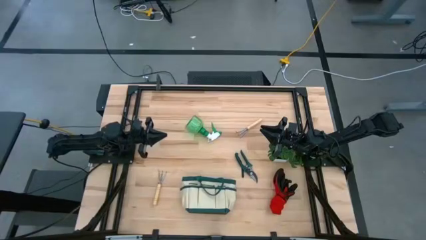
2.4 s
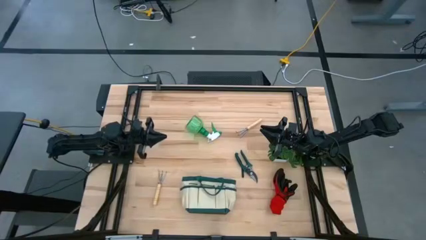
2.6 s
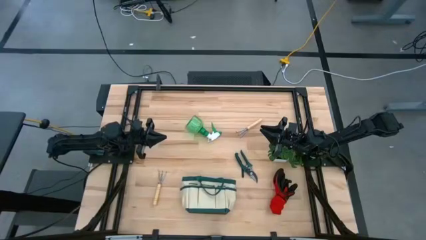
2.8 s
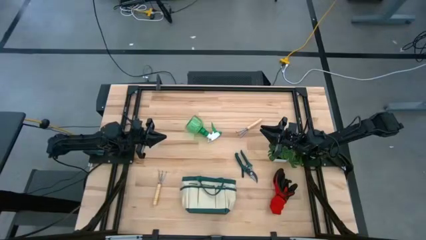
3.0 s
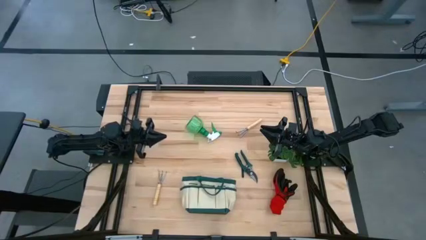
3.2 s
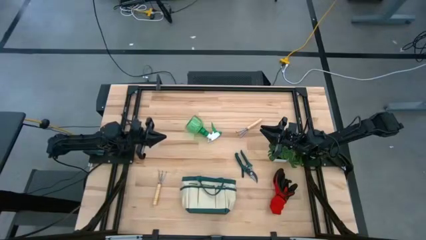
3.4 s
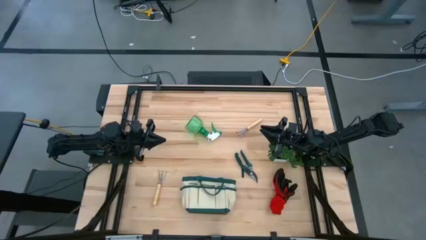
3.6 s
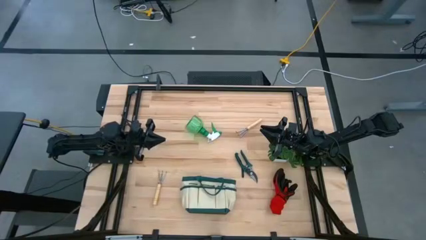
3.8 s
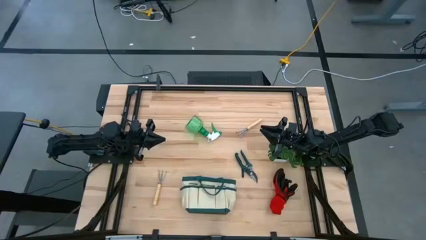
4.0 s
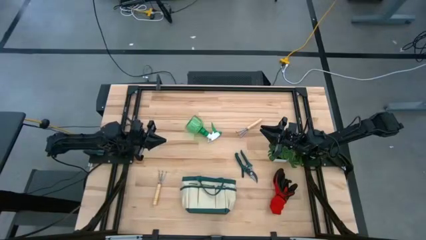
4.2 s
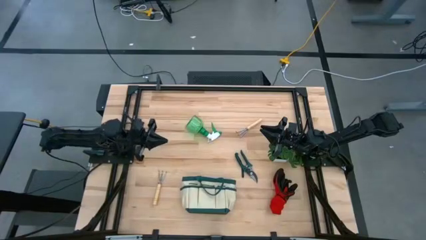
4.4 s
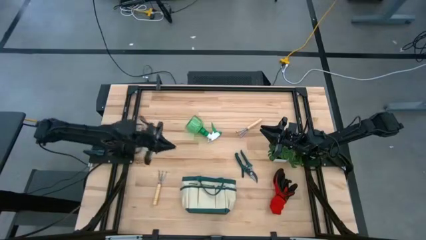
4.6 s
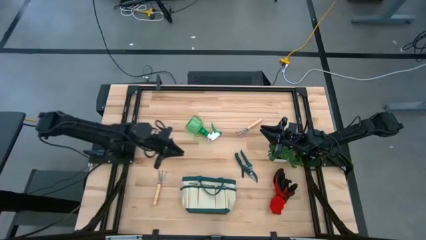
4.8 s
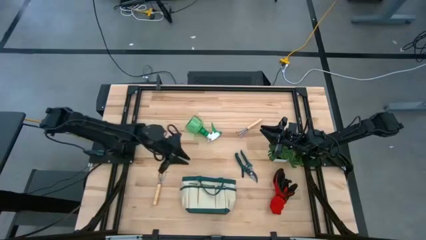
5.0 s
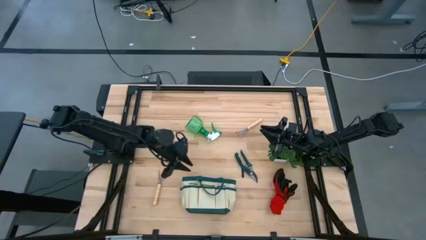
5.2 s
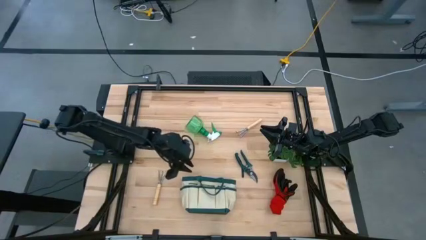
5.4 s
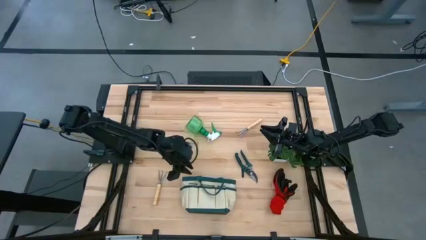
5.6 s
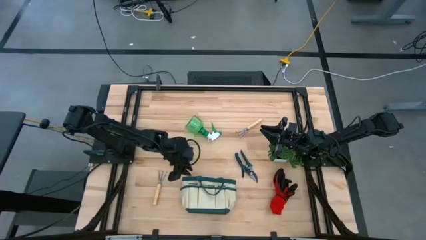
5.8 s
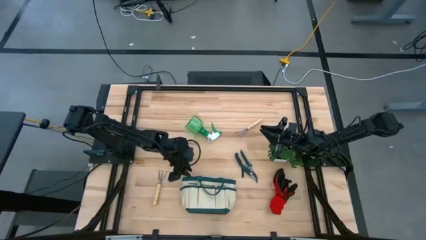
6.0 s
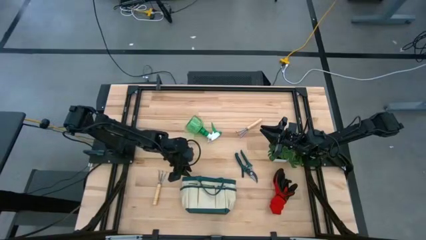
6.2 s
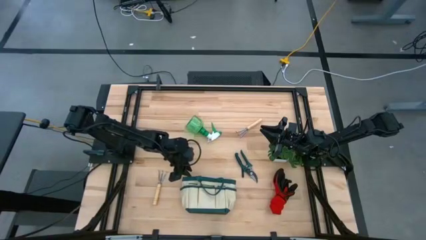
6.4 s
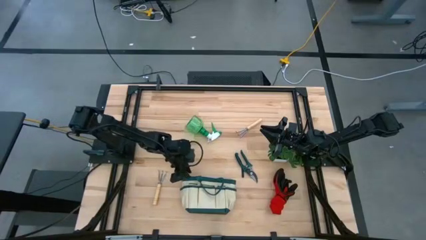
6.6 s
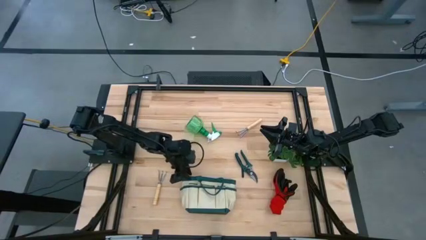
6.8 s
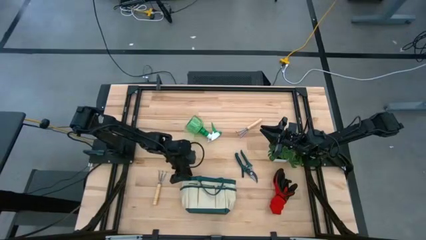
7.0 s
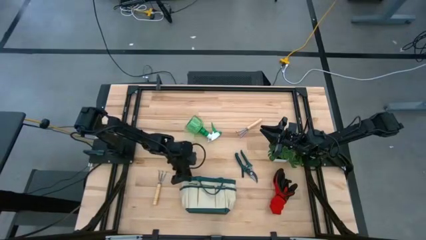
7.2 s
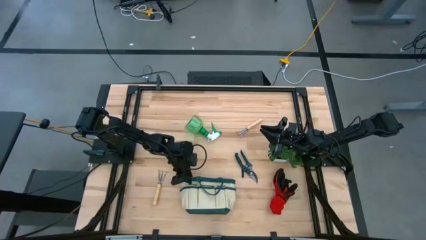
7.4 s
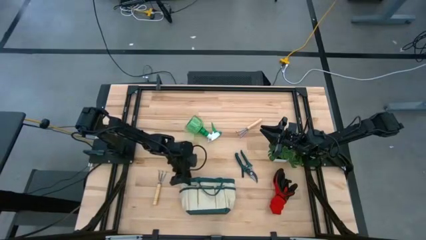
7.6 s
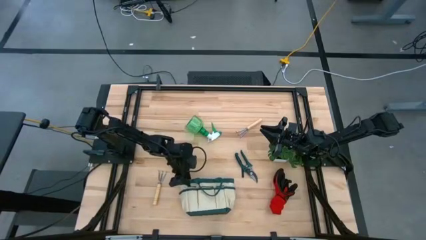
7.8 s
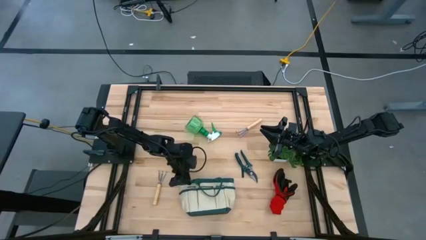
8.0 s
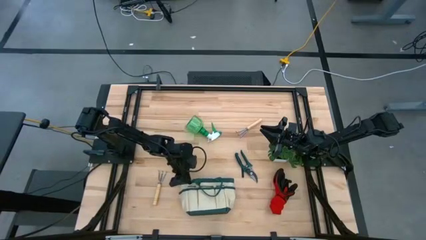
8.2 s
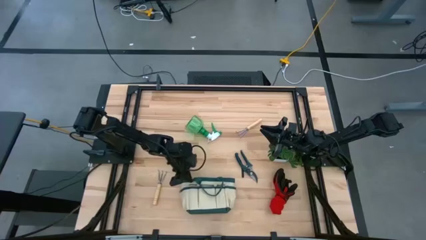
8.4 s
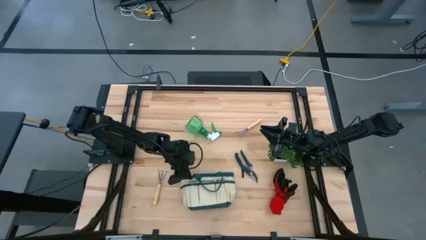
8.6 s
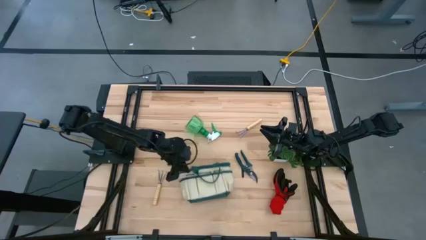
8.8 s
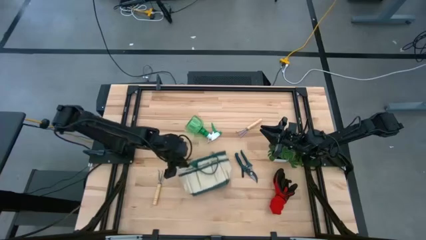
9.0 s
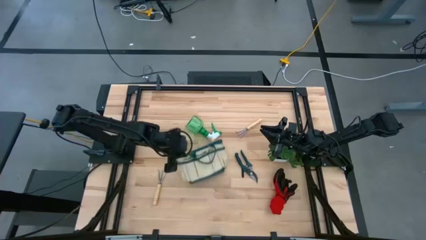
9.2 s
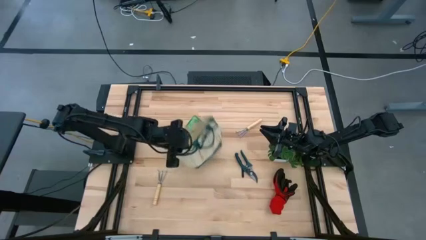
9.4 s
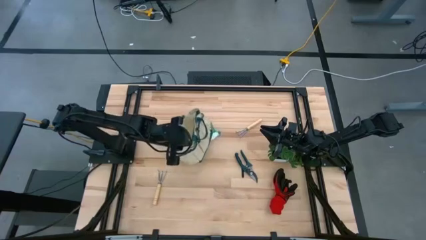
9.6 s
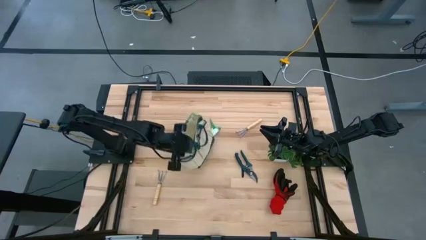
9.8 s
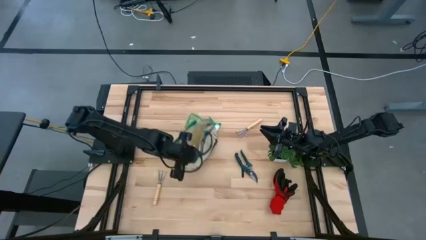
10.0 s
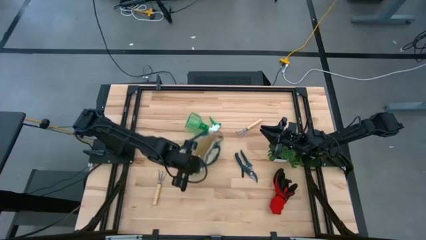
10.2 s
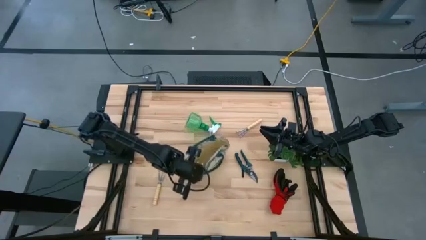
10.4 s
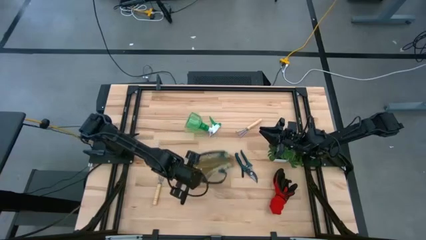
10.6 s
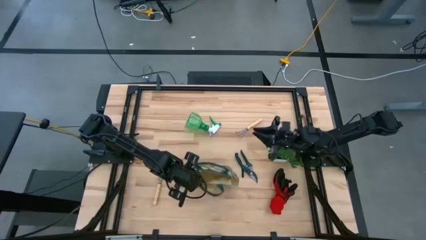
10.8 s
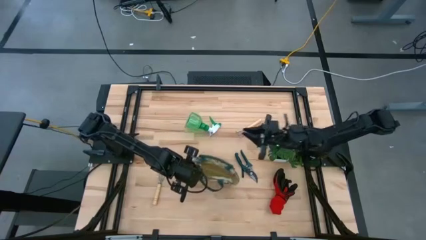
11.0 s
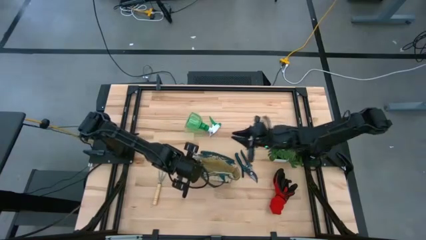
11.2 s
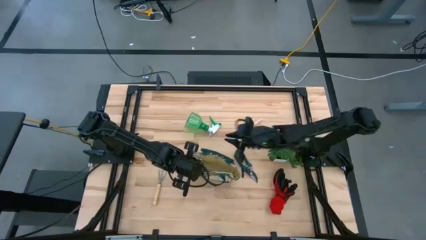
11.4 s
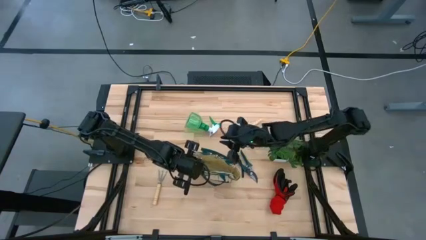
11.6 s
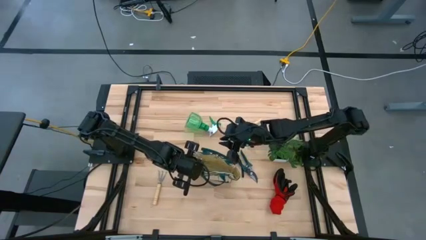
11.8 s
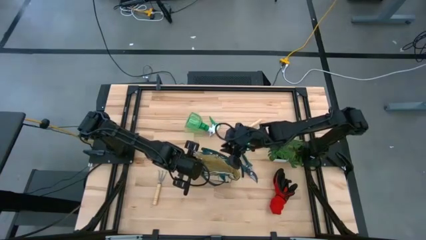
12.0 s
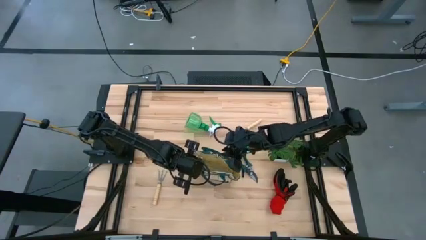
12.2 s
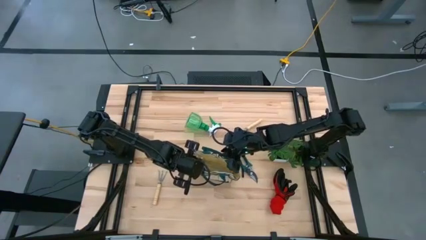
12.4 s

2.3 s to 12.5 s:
Task: Pick & Place Garden tools in Gardening bag
Prepare the gardening bag

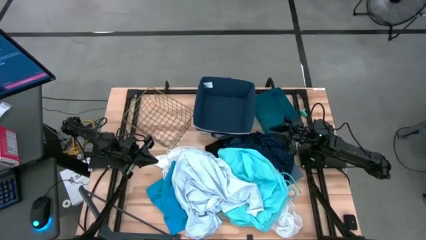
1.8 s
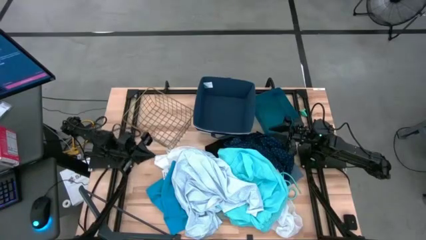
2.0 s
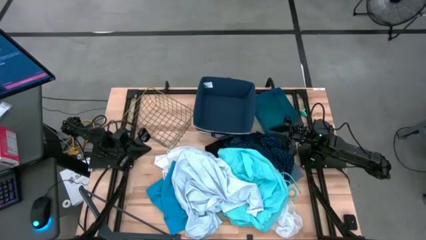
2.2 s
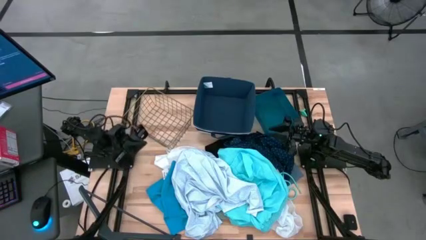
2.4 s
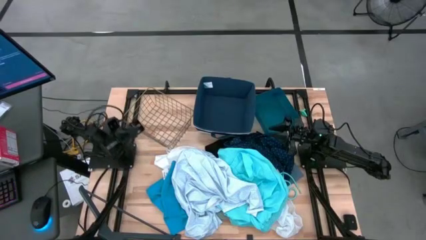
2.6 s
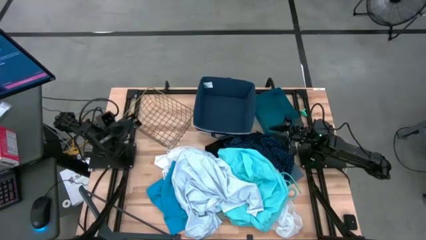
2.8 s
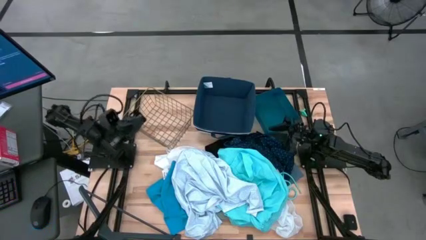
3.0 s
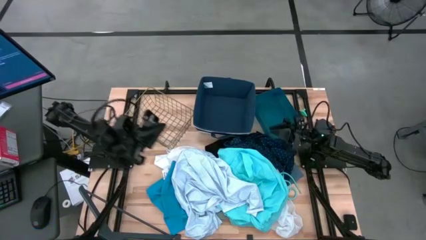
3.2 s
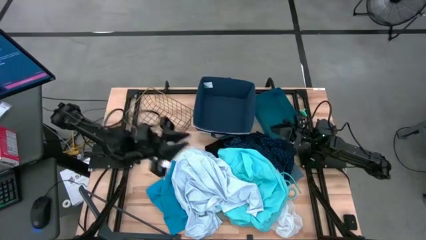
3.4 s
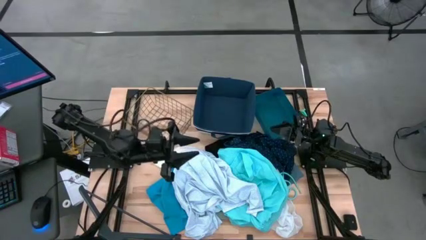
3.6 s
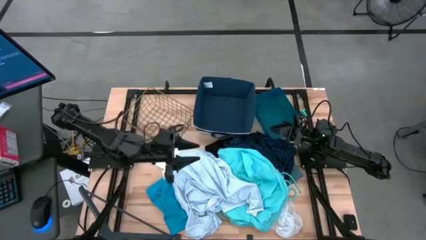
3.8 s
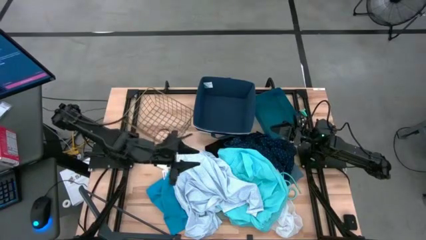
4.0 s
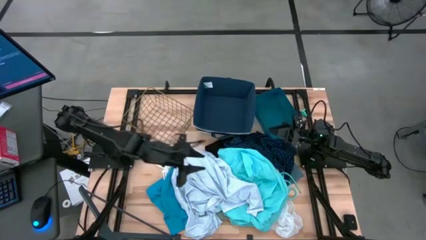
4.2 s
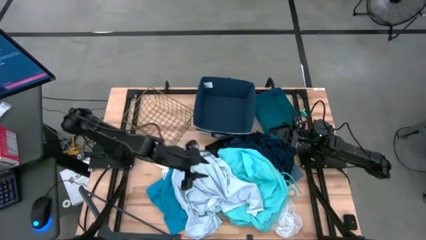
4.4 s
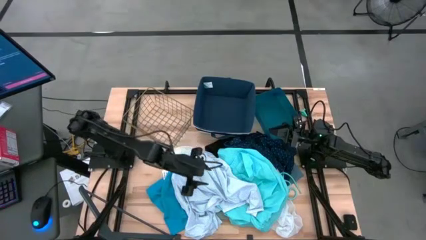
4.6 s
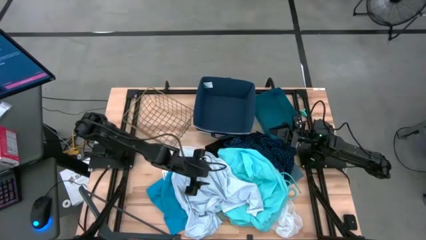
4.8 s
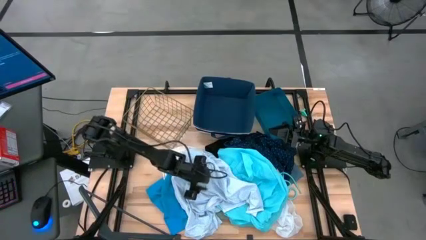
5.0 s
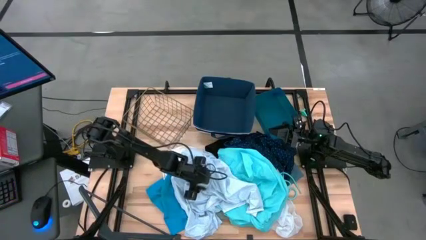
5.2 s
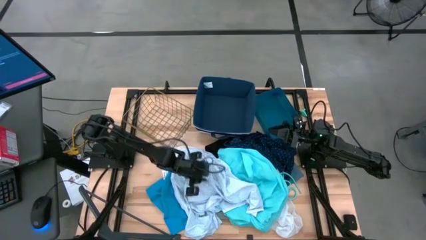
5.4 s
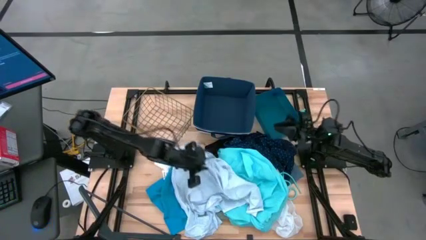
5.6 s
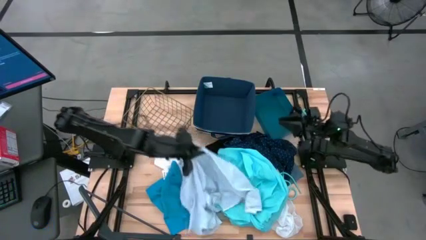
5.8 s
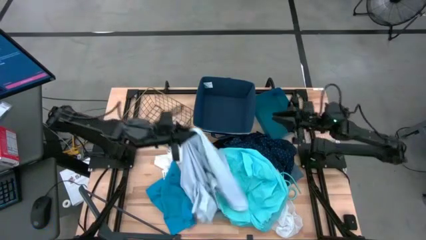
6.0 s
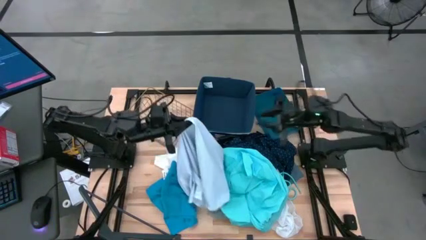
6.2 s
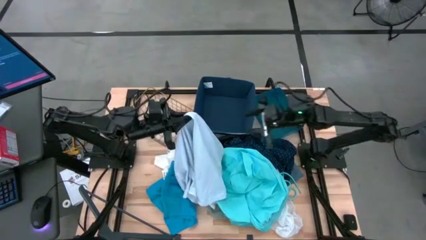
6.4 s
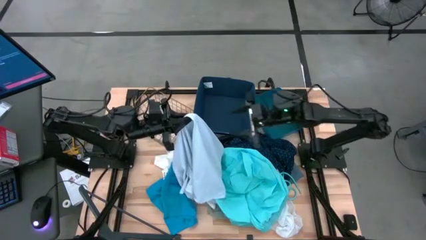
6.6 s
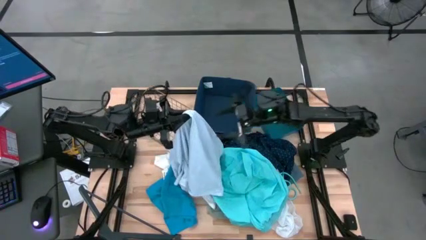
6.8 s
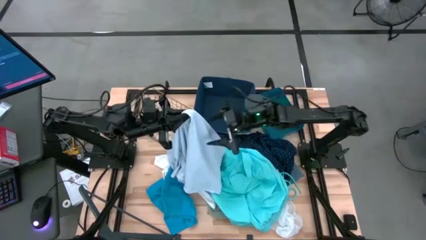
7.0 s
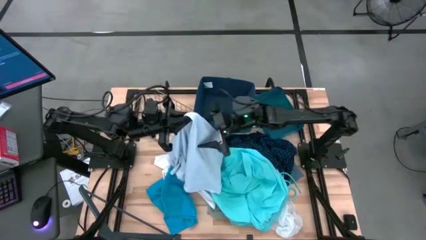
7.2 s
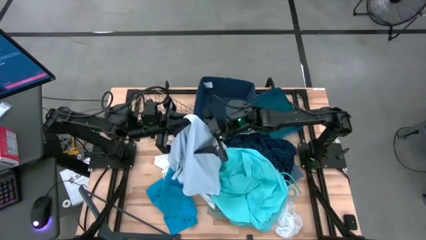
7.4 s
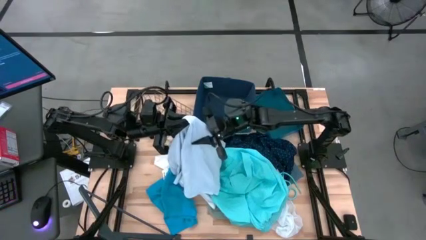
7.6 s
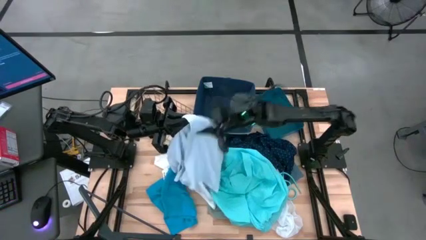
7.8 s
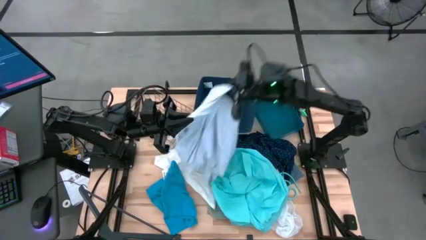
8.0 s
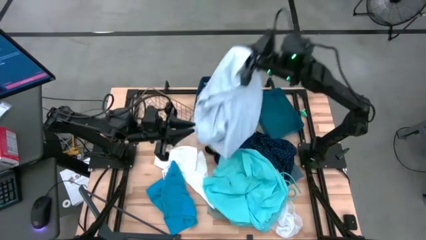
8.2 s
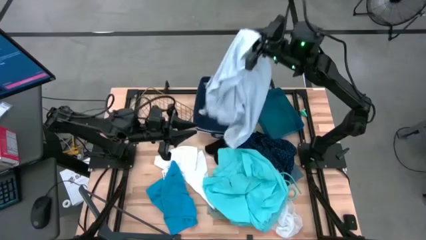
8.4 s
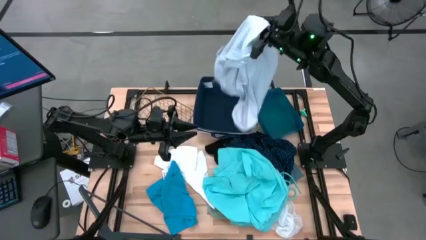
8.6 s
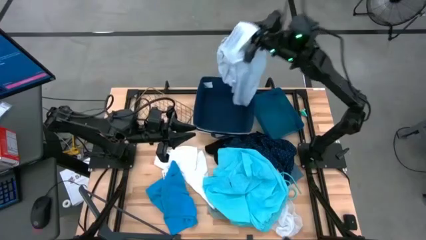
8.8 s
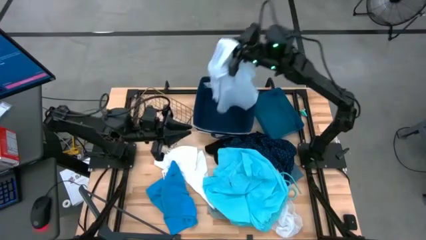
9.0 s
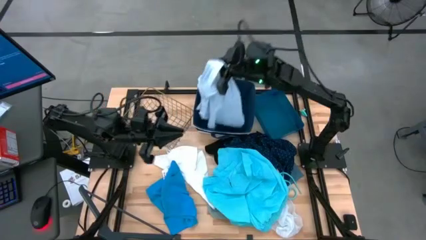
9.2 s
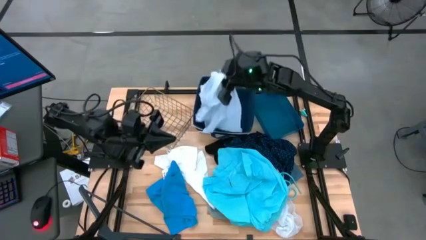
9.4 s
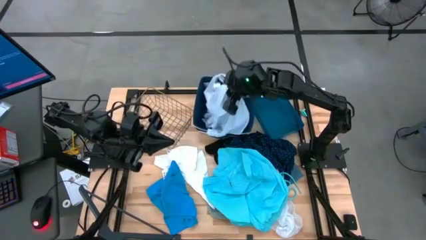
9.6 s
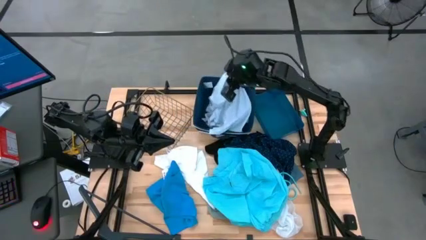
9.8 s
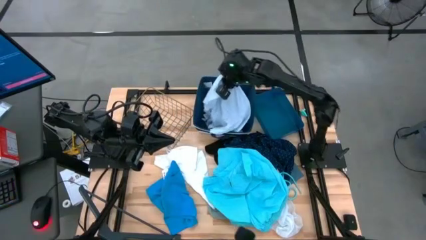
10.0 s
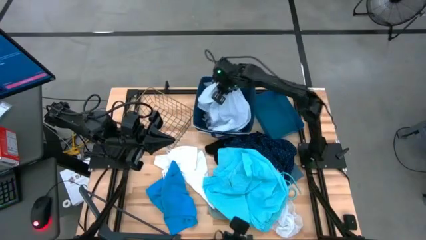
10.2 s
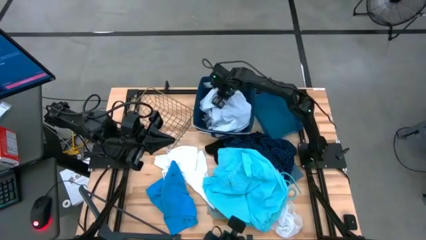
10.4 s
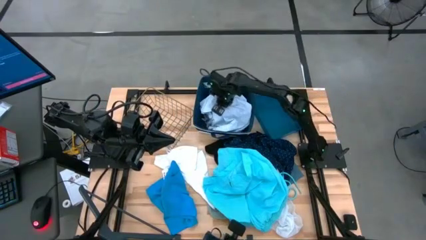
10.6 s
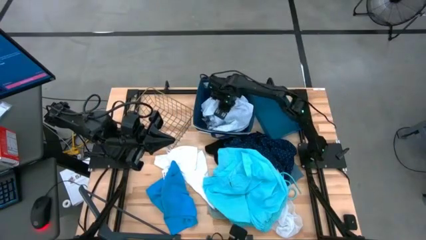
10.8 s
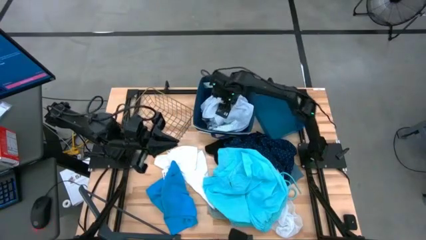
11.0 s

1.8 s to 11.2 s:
Task: Pick & Place Cloths
Put the white polo shirt into the blue laundry bin
